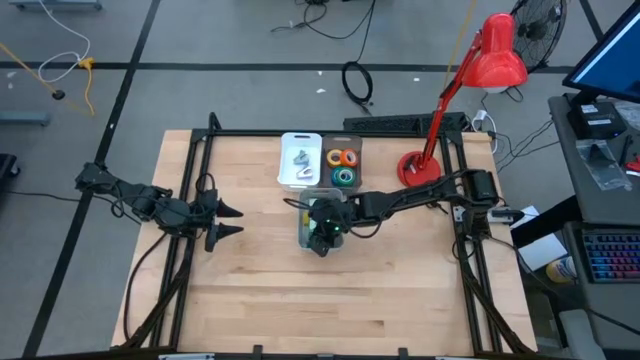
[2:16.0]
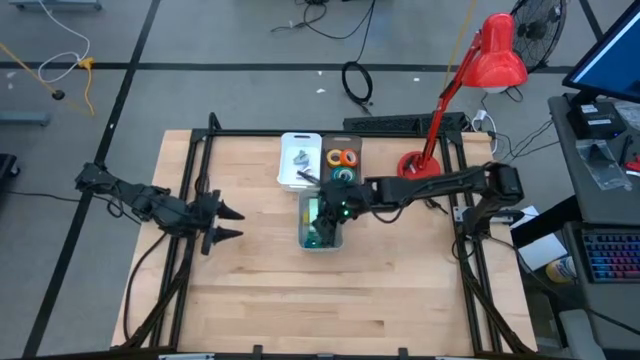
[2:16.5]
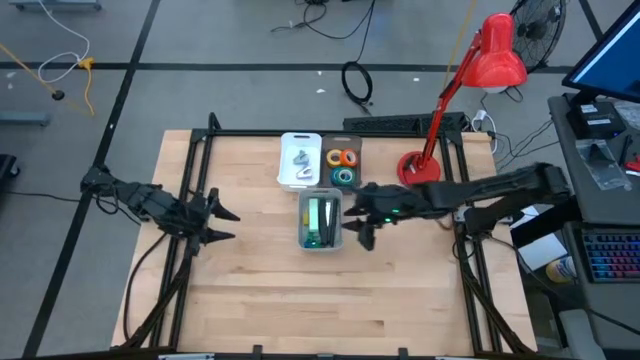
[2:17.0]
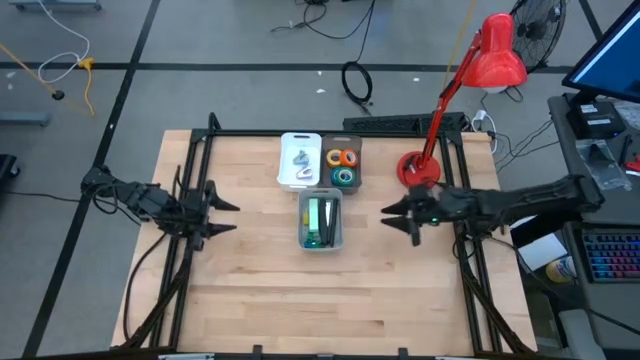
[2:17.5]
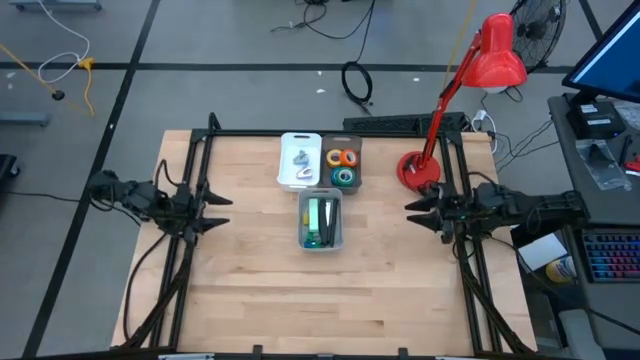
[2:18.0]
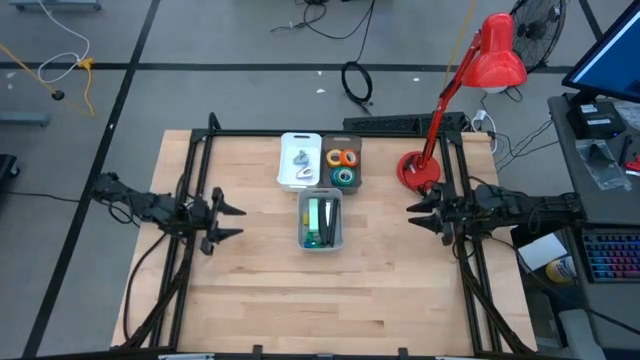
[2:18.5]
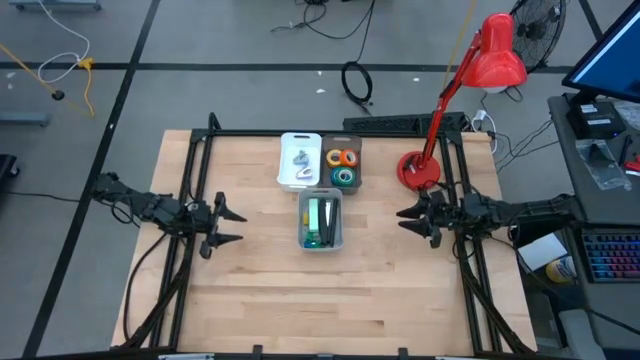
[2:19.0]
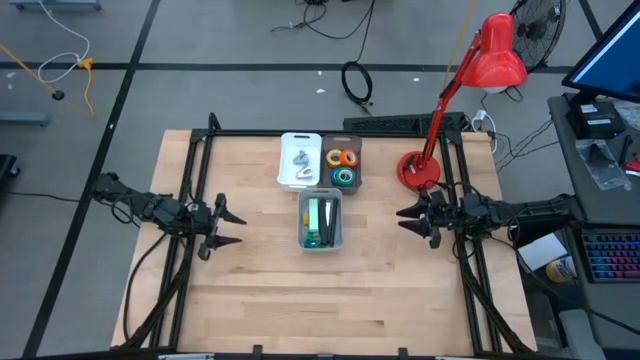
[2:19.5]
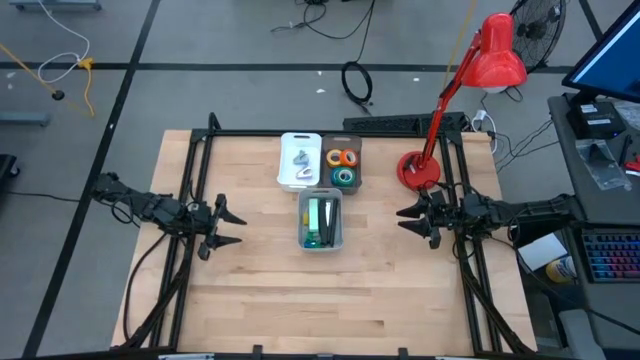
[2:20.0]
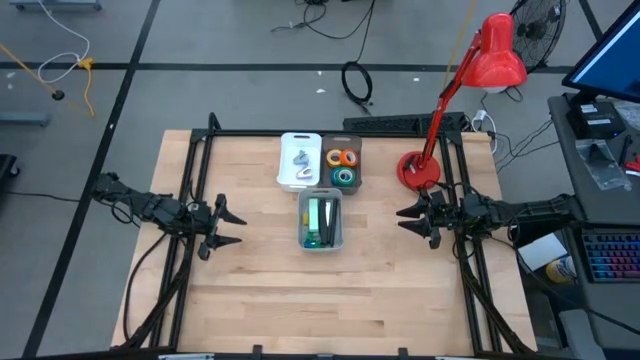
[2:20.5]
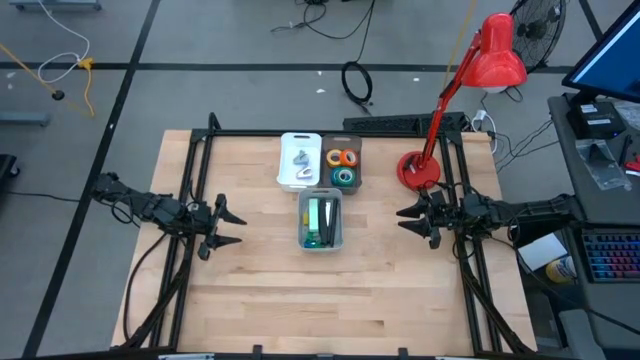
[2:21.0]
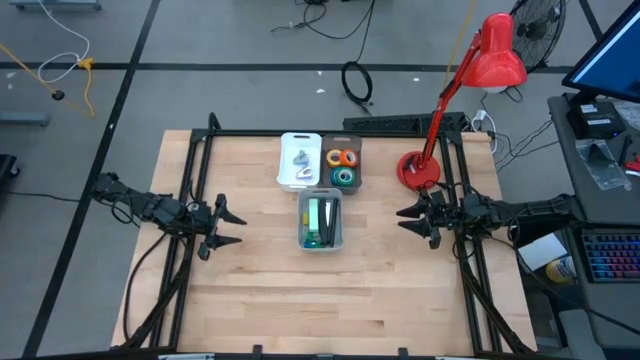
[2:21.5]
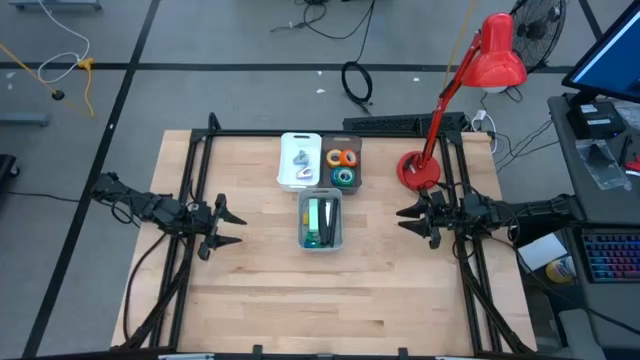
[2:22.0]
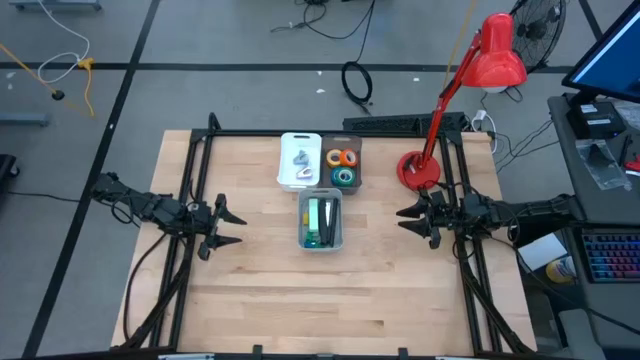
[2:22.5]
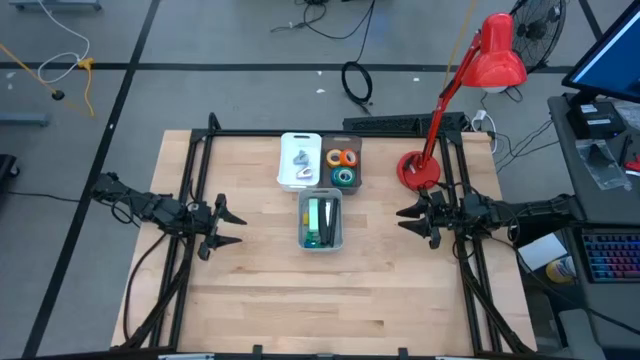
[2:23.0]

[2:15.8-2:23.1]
Task: Pick and place Stapler, Stapler remover, tape
Return to Home Position

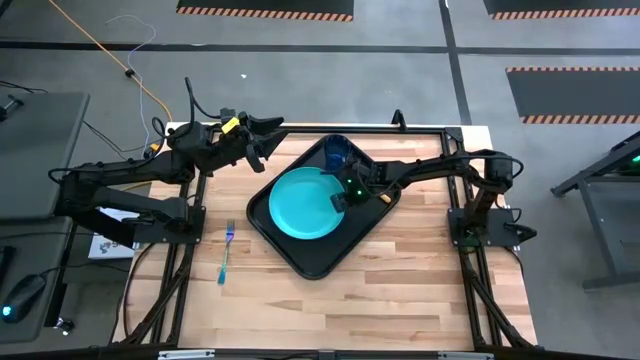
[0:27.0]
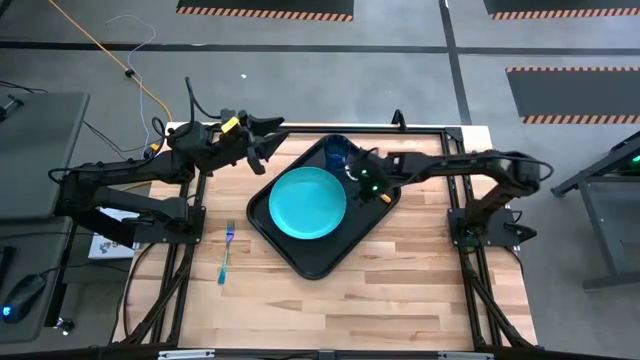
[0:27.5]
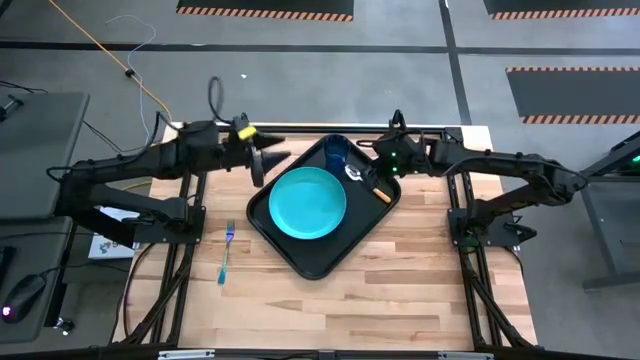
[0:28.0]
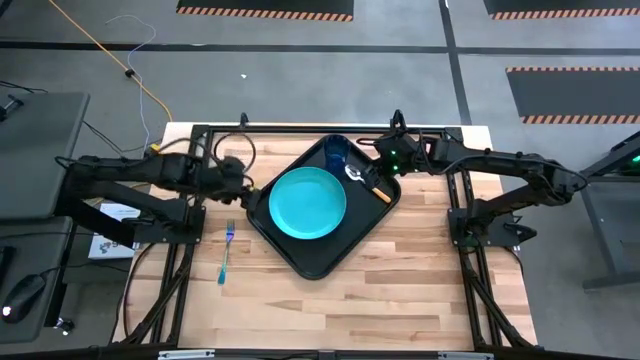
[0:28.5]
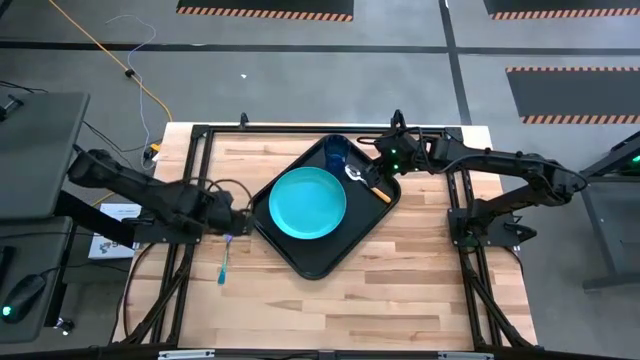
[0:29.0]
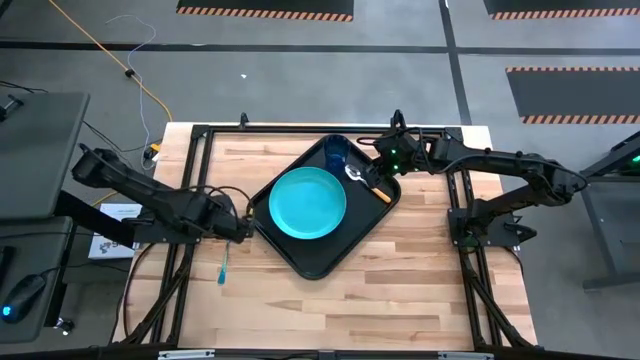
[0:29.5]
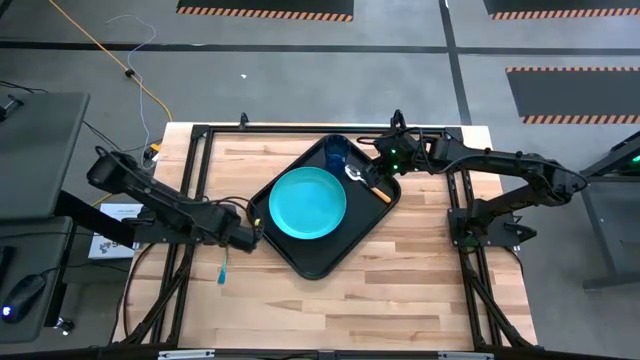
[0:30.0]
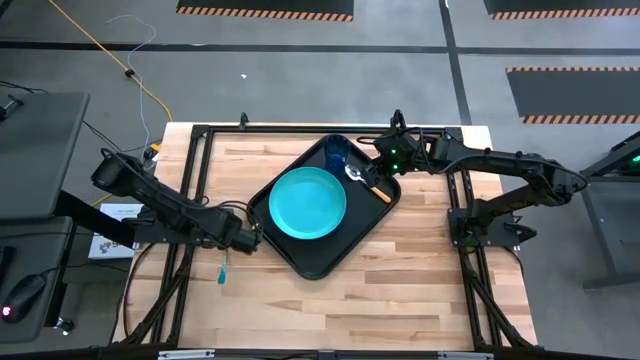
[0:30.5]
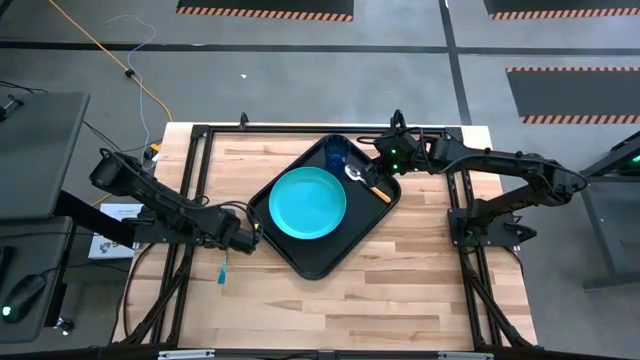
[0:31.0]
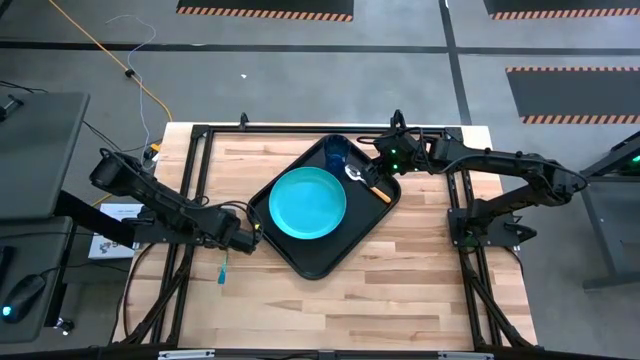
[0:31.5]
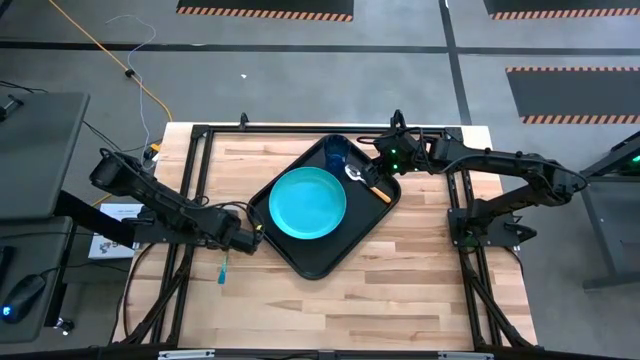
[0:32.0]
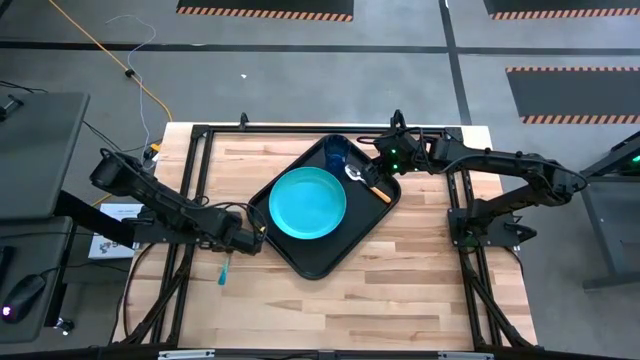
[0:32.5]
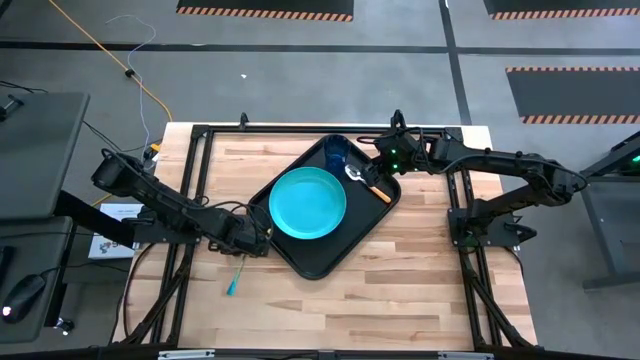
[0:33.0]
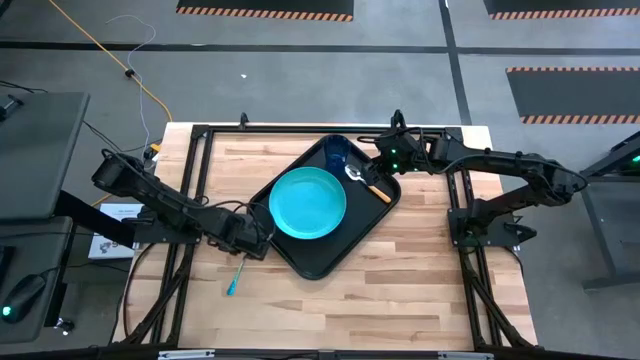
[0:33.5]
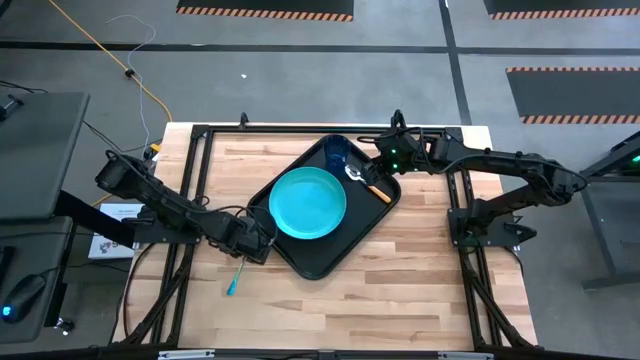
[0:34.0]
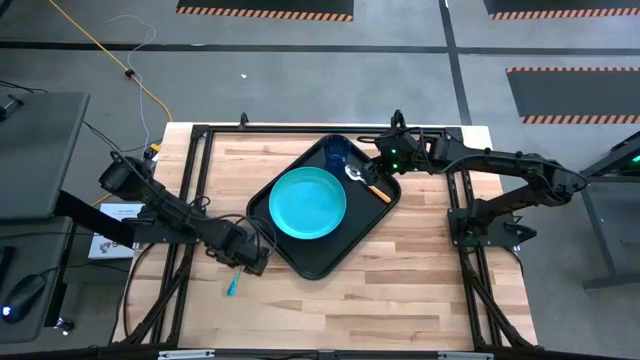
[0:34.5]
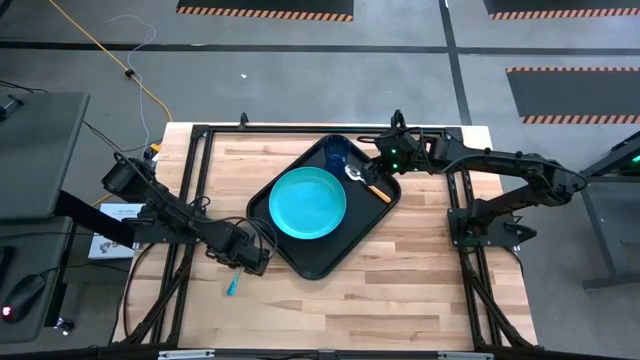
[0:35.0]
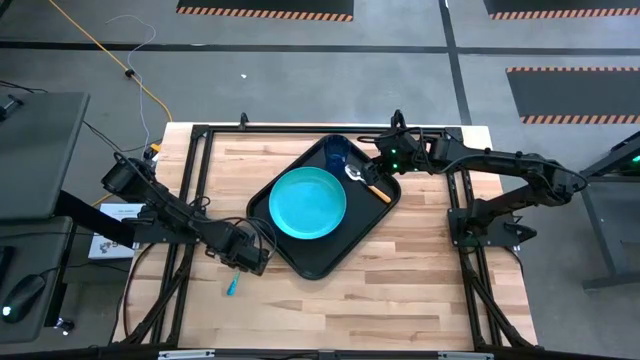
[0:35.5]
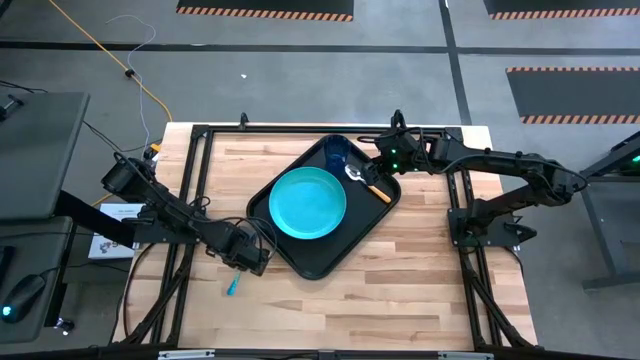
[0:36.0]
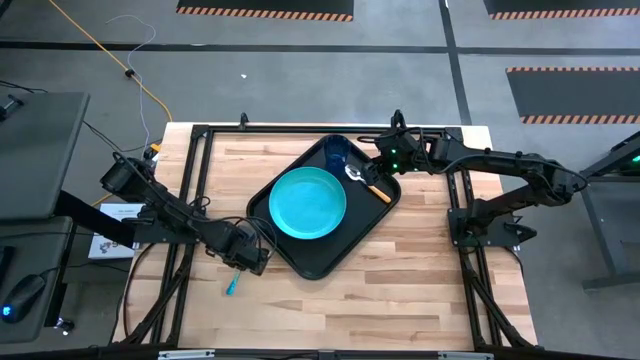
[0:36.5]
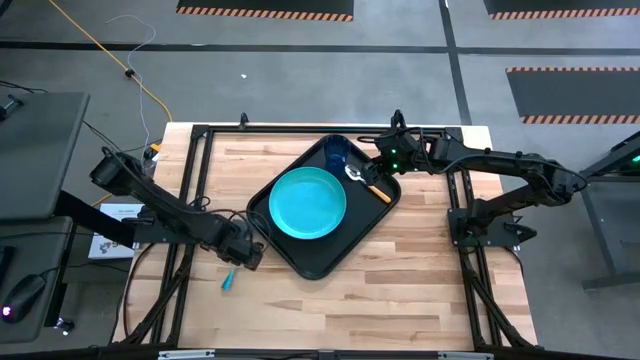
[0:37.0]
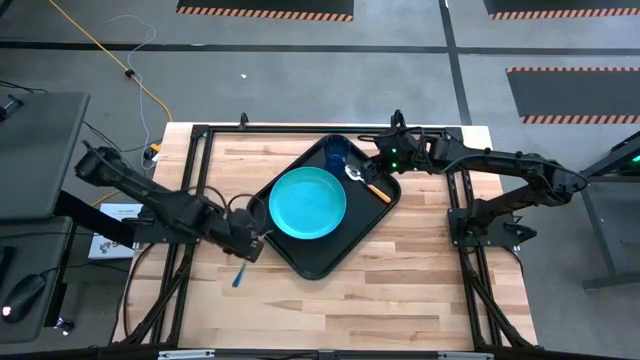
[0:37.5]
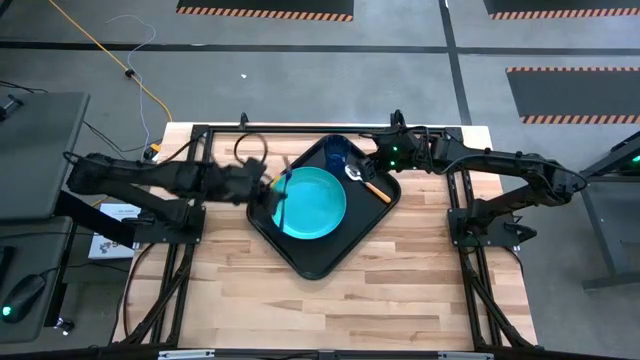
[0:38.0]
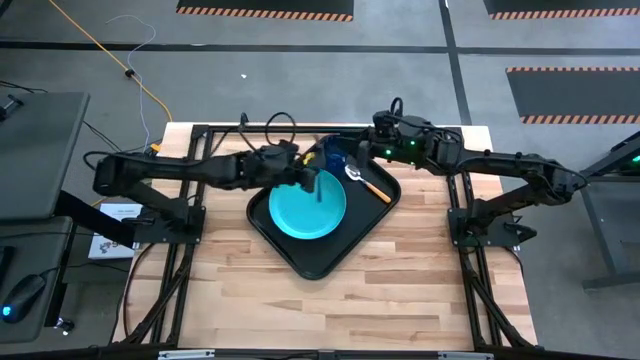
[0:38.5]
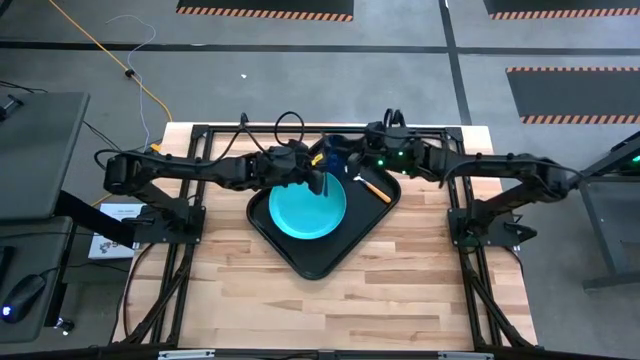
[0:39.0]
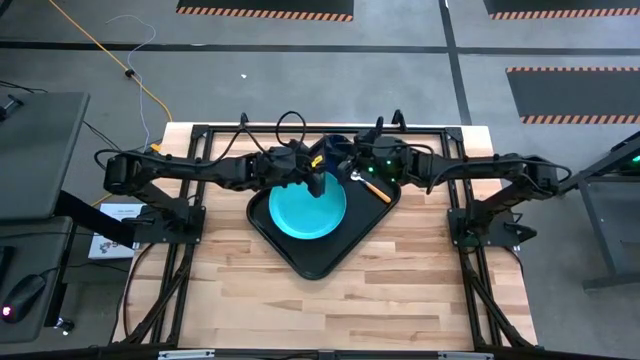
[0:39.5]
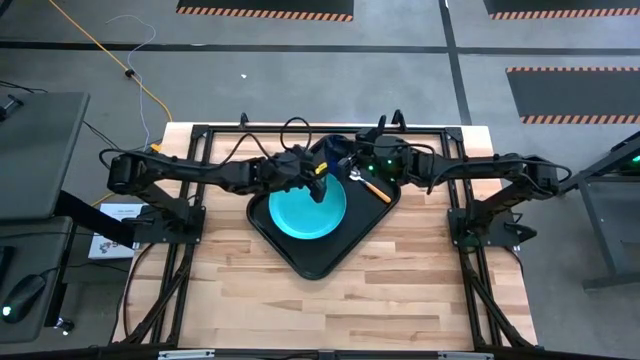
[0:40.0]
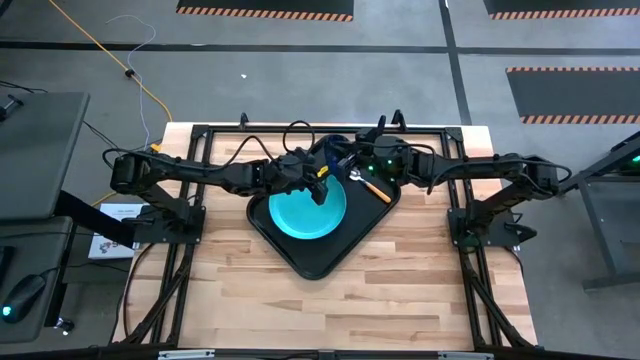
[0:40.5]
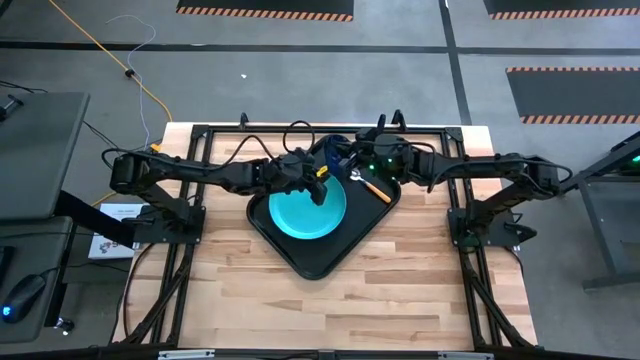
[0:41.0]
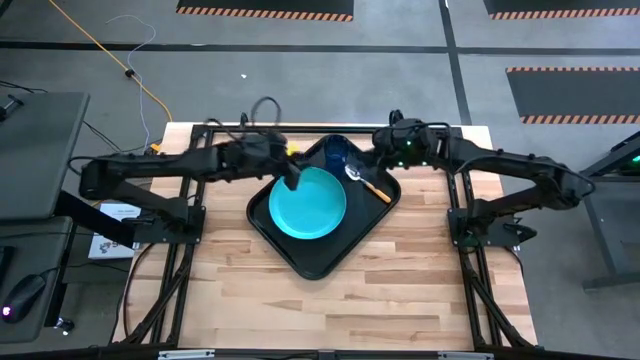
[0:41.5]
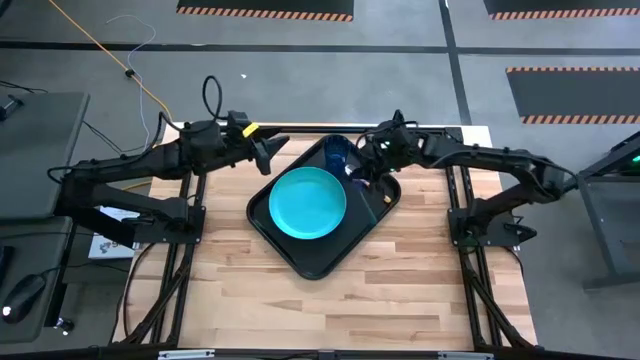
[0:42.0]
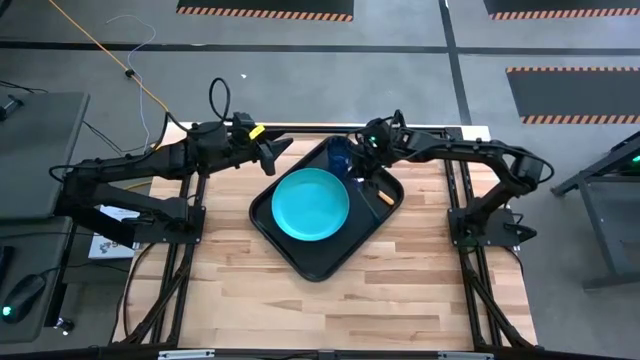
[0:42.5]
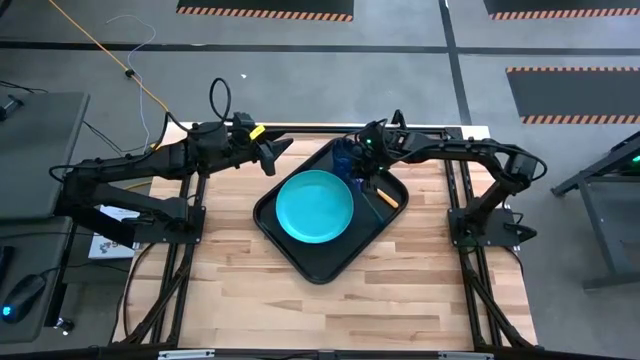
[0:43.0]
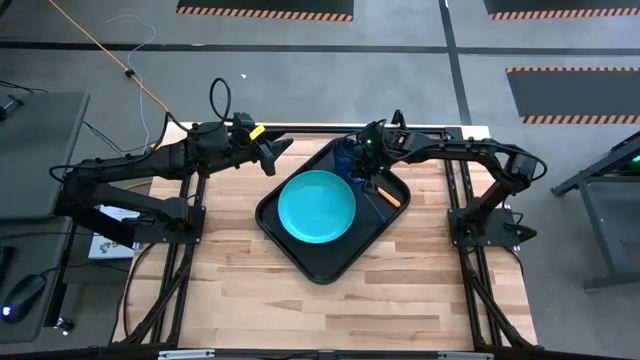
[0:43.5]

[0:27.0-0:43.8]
Task: Pick and place plate/cup/fork/spoon on tray
Put the purple fork on the black tray beside the orange spoon
